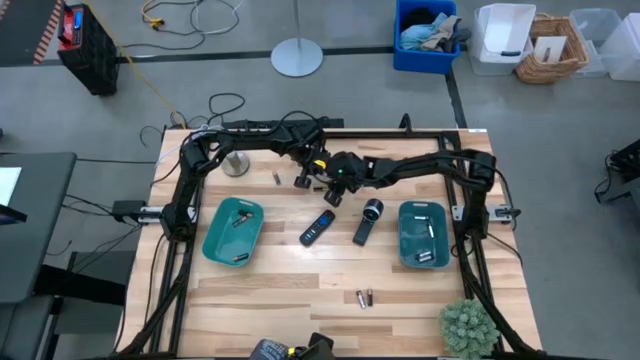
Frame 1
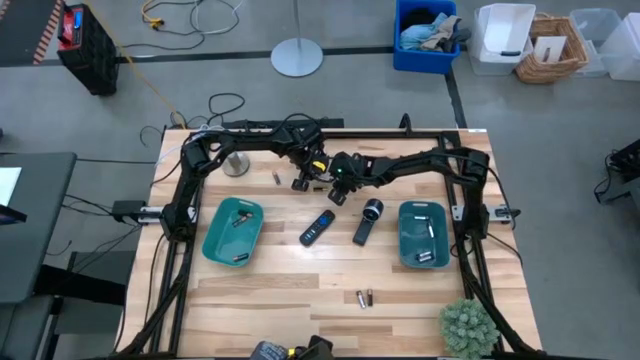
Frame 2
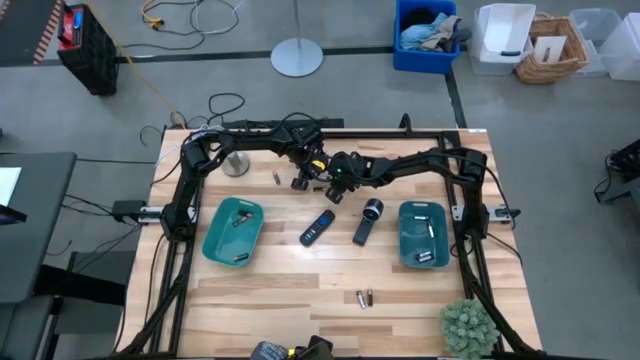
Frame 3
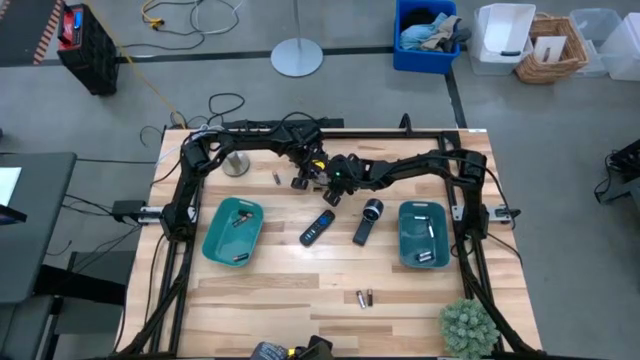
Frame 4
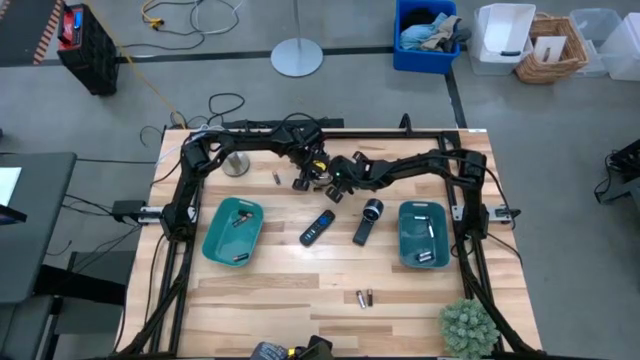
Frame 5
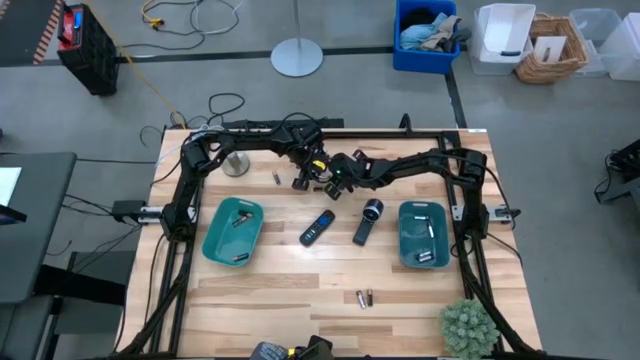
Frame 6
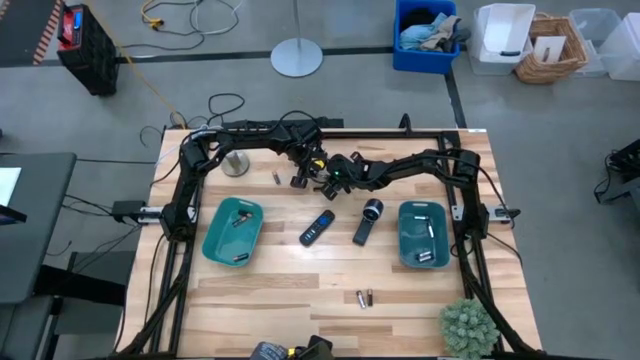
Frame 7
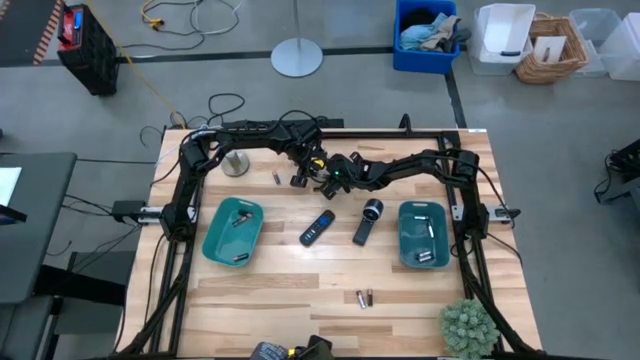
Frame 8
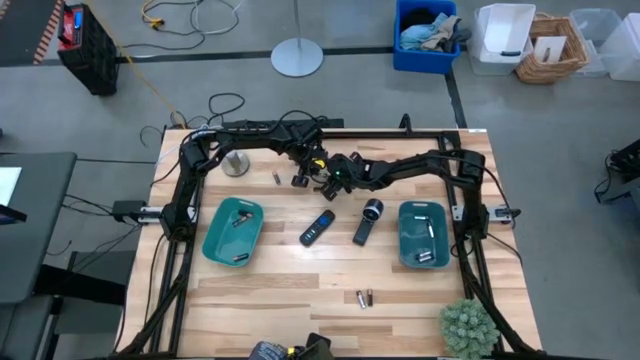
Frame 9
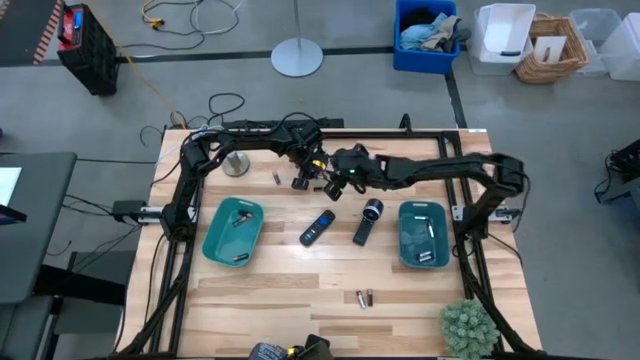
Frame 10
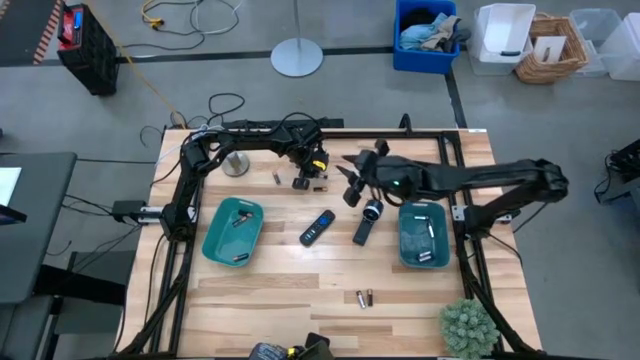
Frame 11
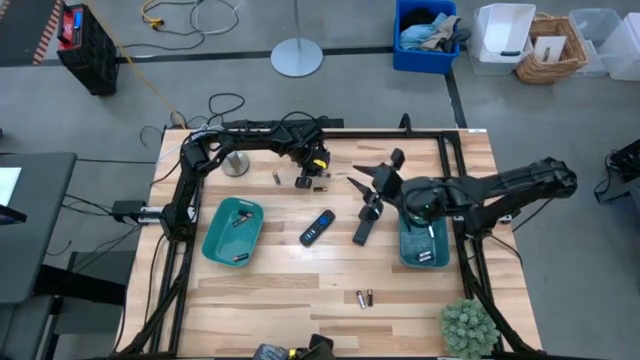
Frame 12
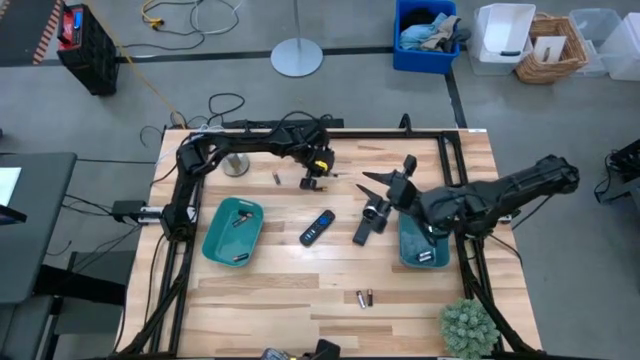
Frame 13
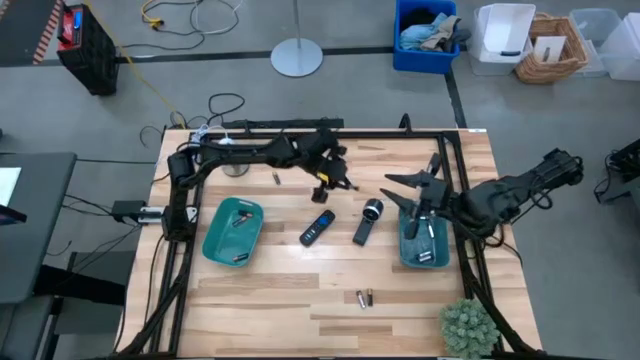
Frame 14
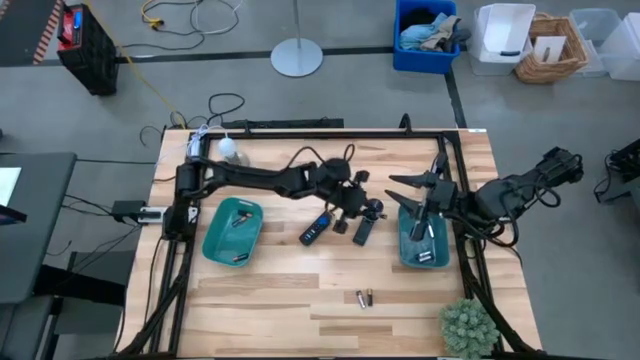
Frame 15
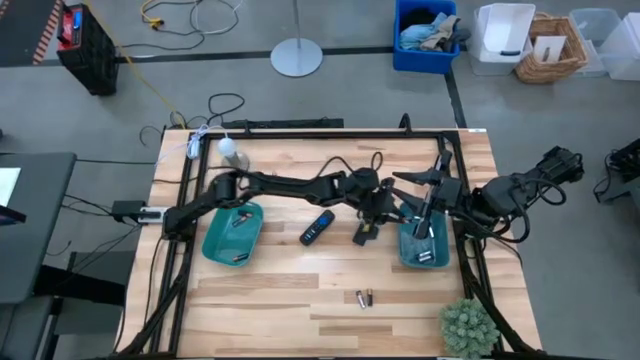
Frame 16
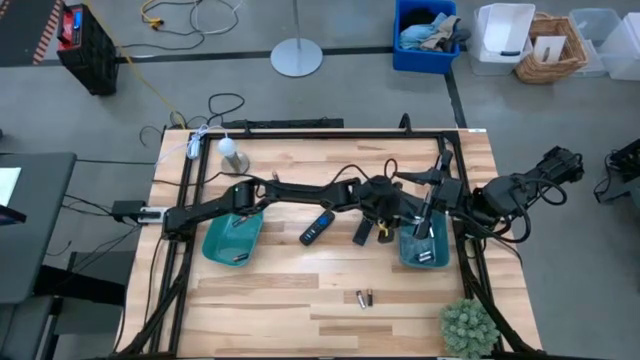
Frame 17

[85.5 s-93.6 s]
Task: Sort batteries
Put the silver battery into the blue bin

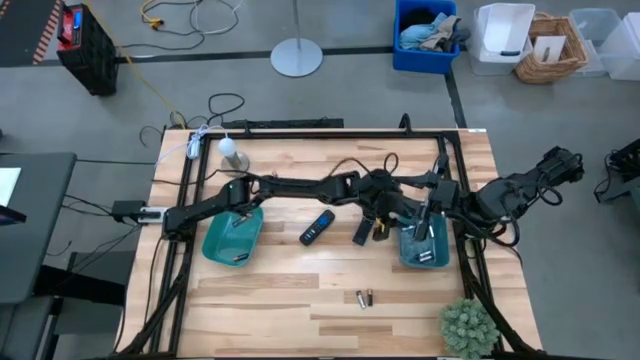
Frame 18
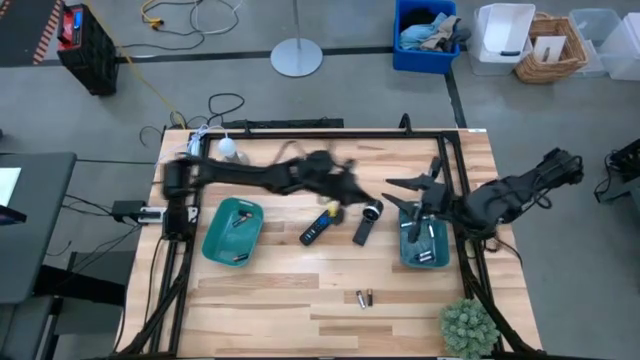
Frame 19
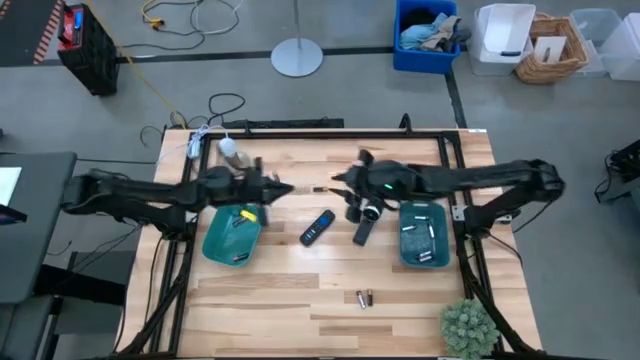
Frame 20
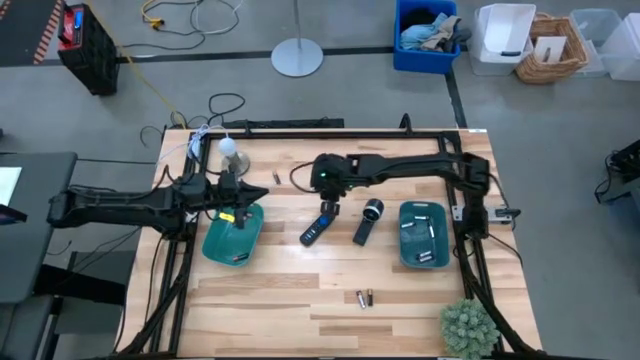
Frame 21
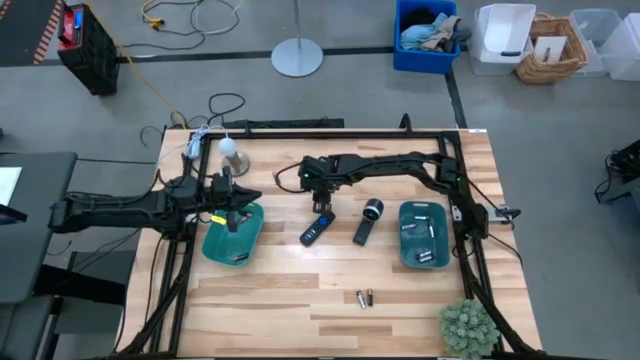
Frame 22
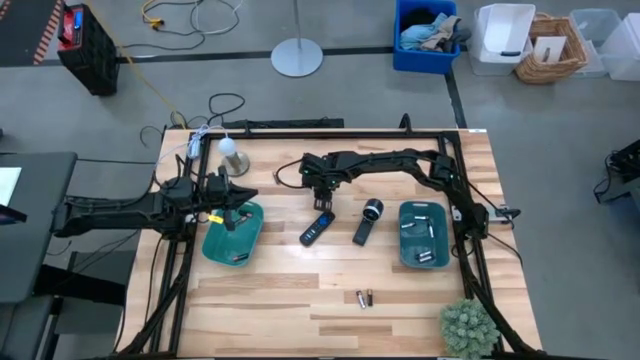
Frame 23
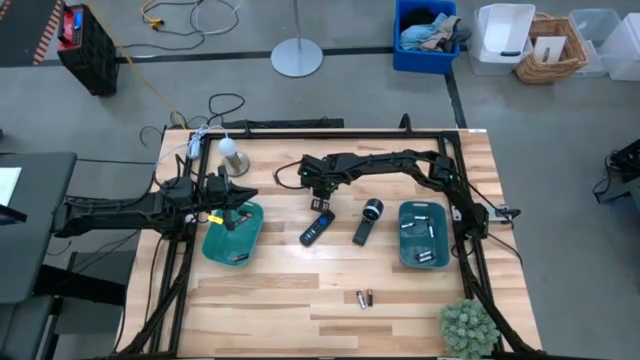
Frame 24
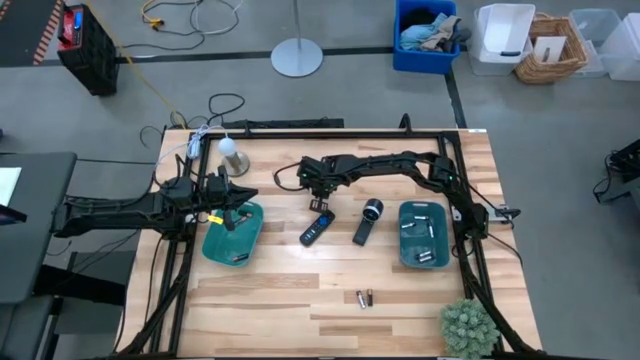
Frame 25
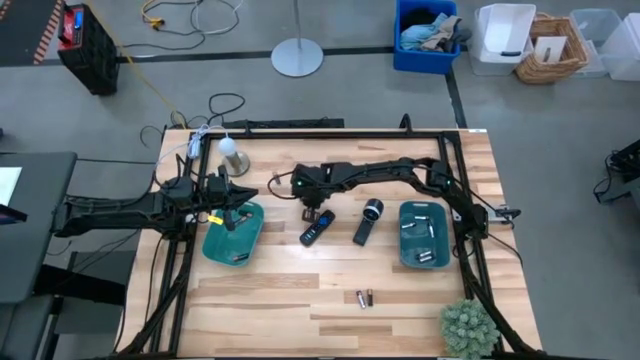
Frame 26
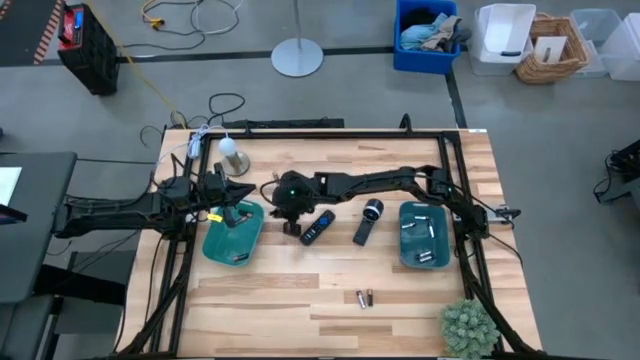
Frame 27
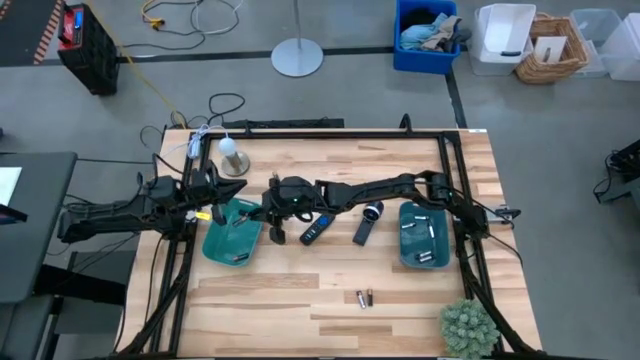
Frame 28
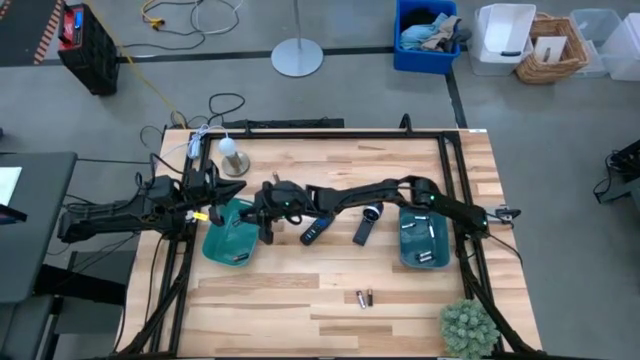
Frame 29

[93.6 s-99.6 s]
Put the brown battery into the green bin

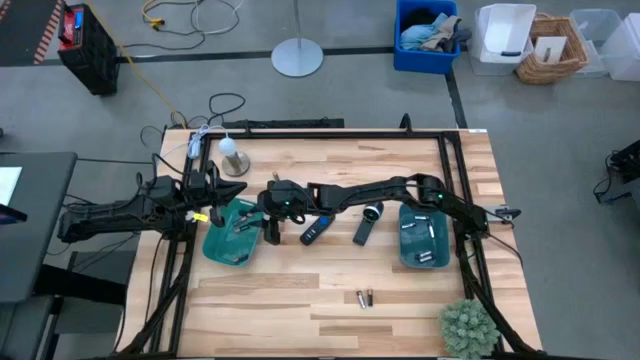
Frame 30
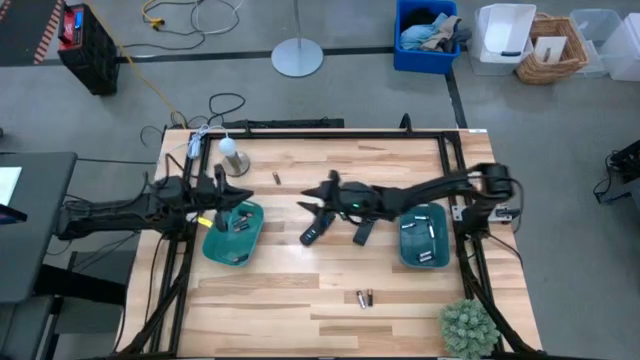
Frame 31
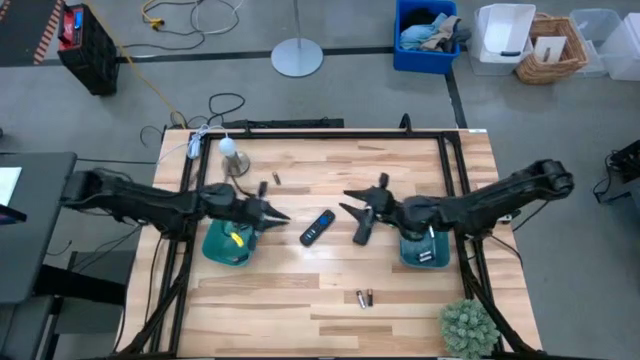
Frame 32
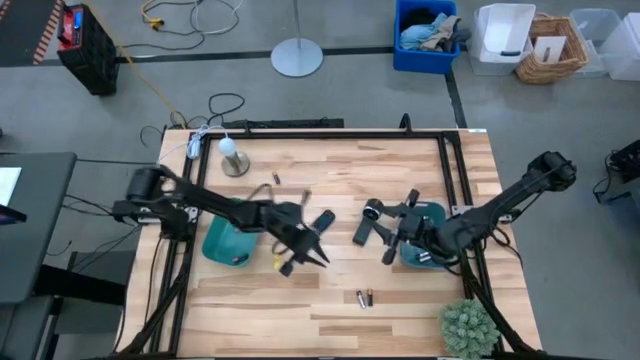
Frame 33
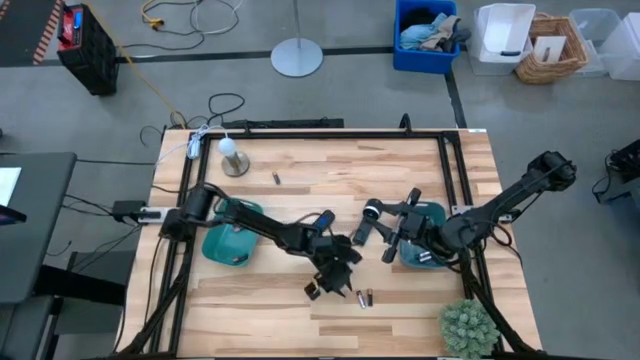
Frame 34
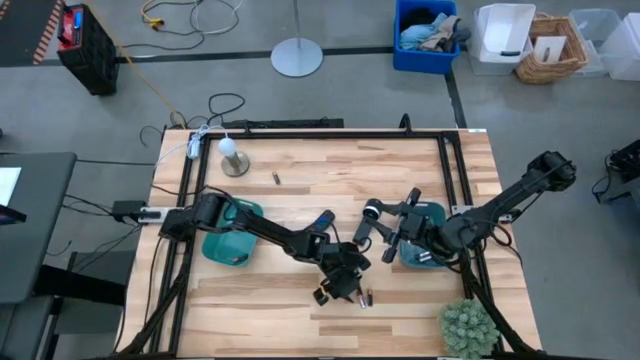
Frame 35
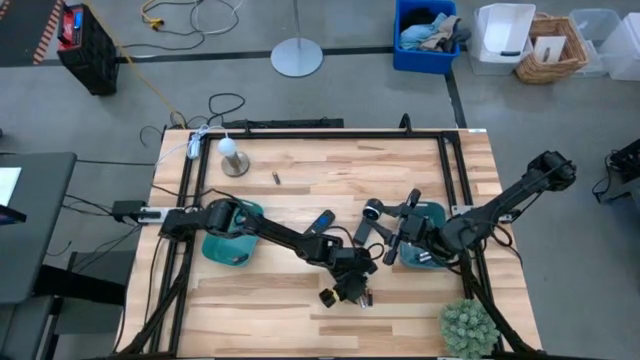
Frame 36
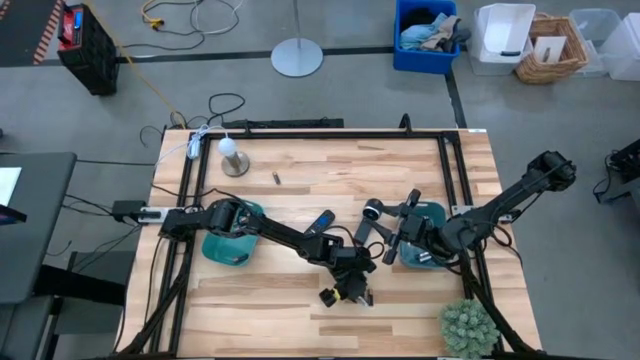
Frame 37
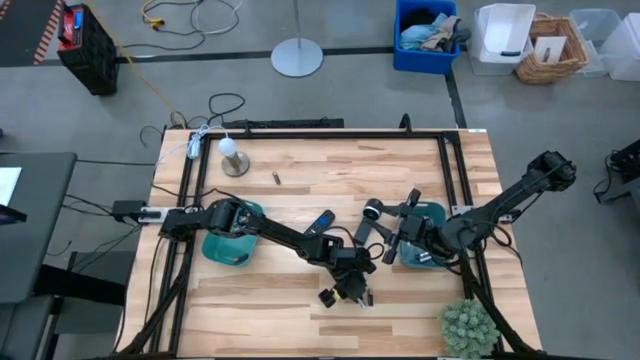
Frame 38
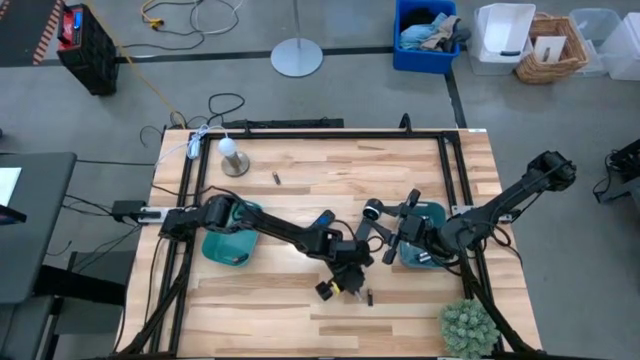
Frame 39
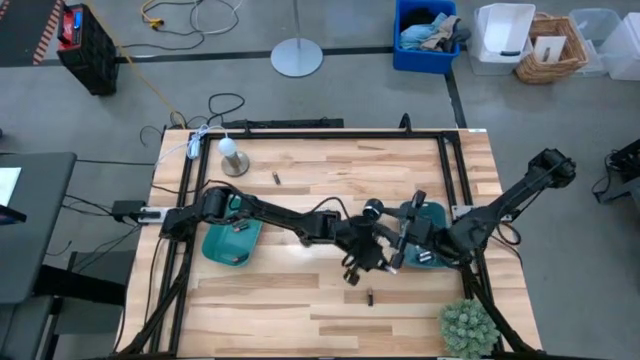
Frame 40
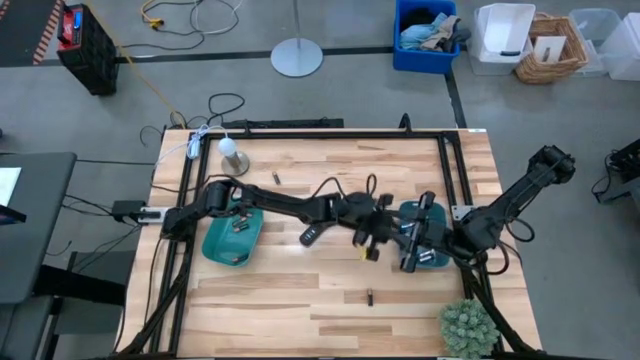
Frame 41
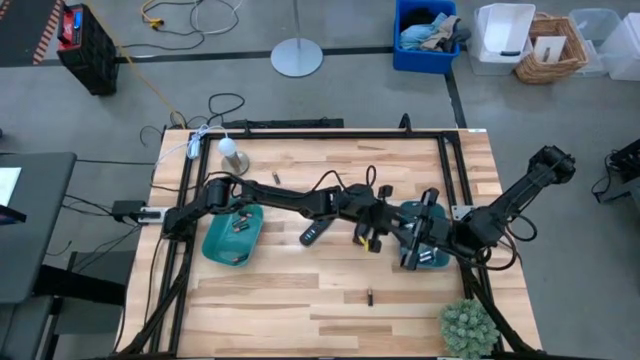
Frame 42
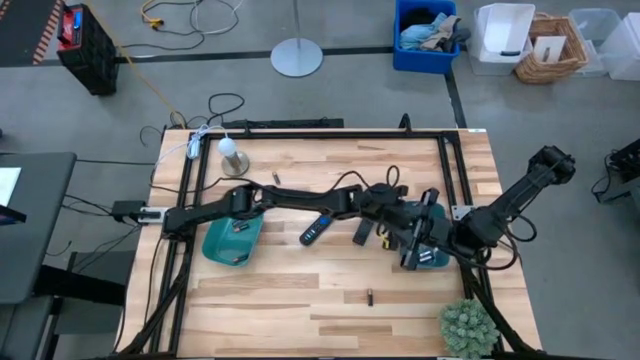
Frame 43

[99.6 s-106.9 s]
Put the silver battery into the blue bin
